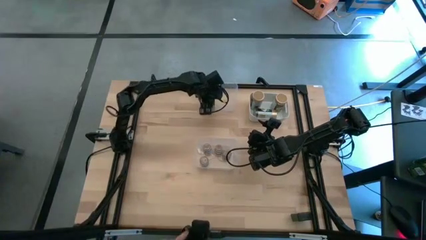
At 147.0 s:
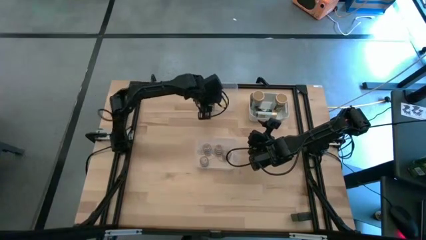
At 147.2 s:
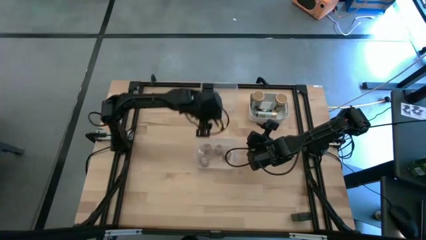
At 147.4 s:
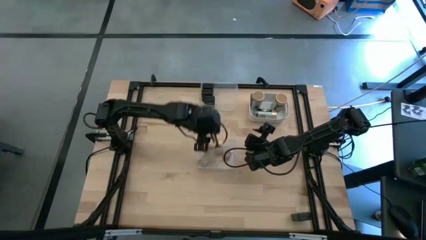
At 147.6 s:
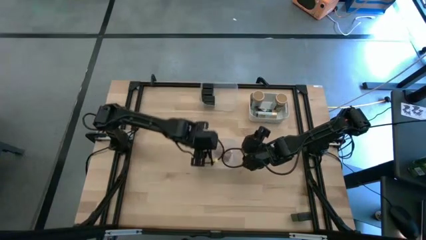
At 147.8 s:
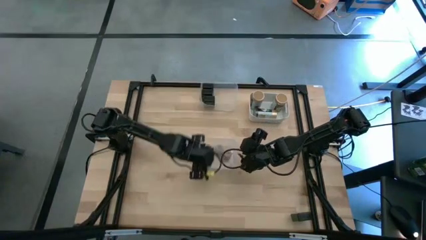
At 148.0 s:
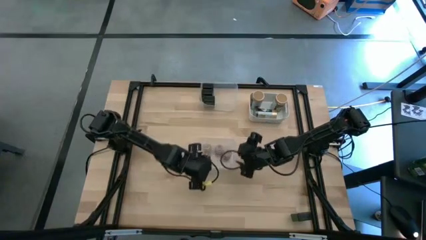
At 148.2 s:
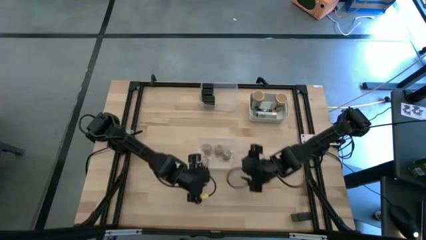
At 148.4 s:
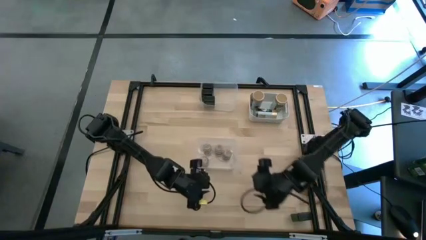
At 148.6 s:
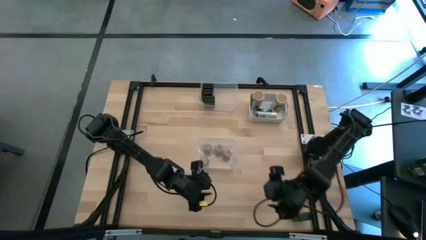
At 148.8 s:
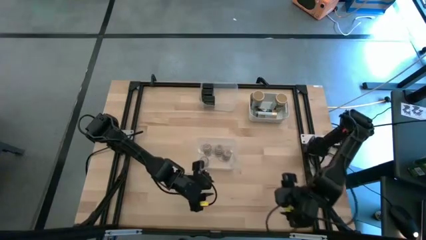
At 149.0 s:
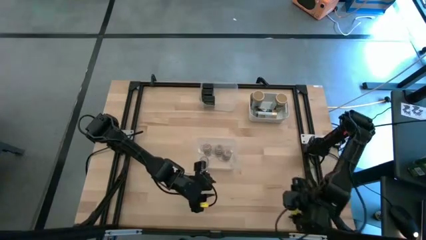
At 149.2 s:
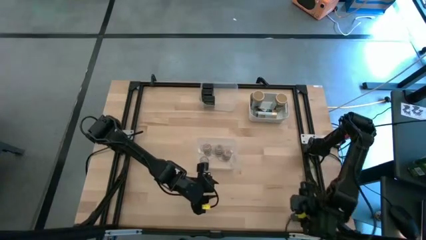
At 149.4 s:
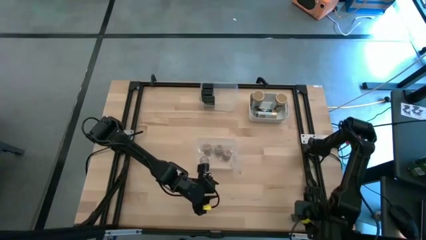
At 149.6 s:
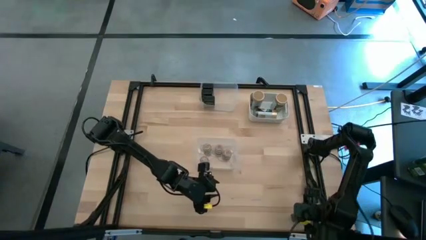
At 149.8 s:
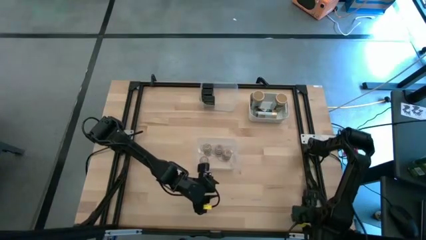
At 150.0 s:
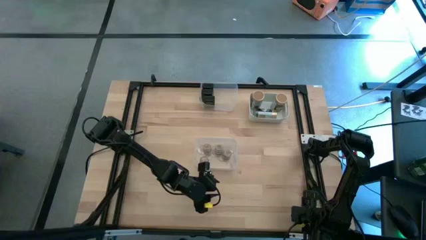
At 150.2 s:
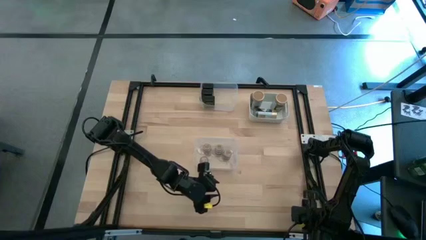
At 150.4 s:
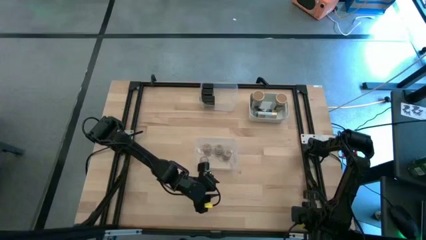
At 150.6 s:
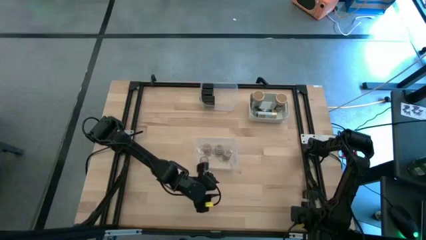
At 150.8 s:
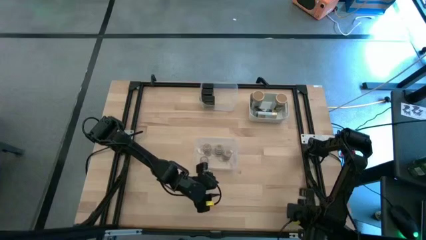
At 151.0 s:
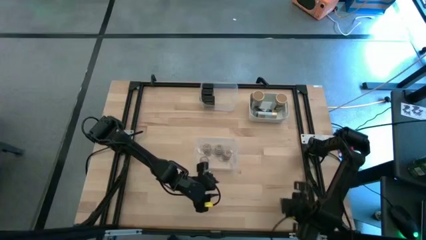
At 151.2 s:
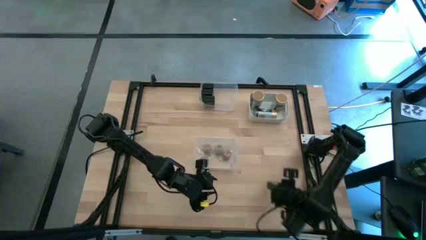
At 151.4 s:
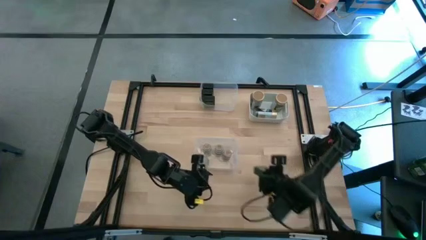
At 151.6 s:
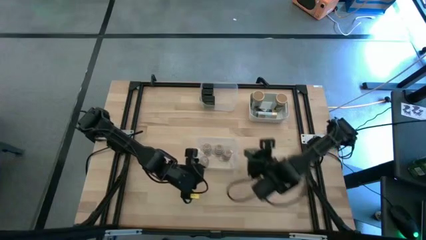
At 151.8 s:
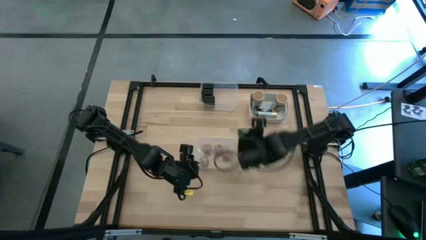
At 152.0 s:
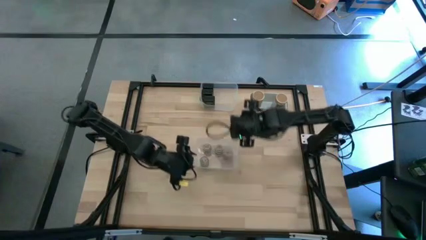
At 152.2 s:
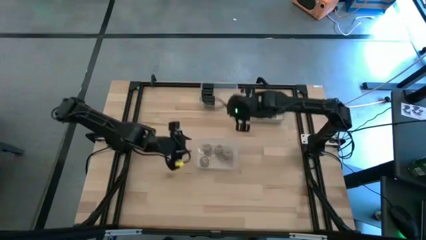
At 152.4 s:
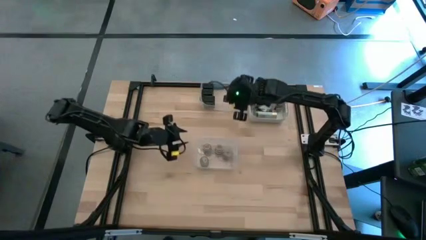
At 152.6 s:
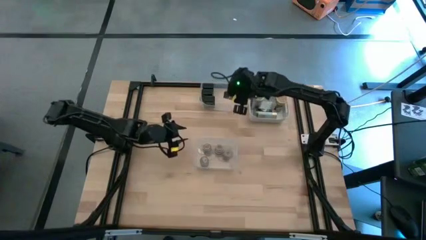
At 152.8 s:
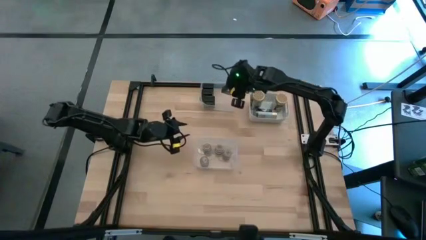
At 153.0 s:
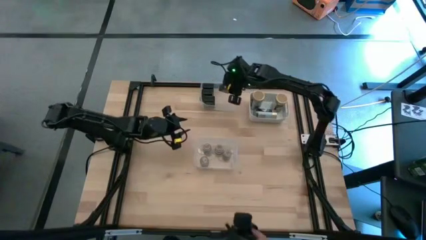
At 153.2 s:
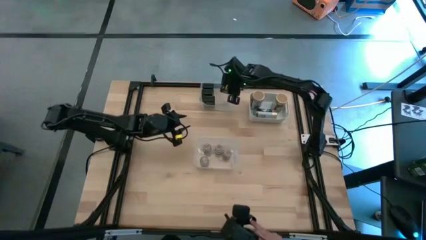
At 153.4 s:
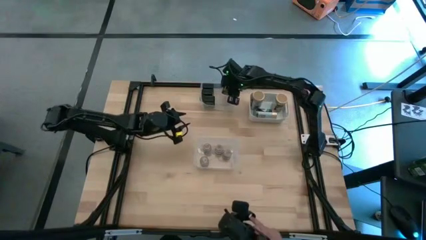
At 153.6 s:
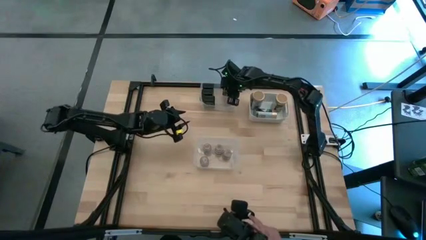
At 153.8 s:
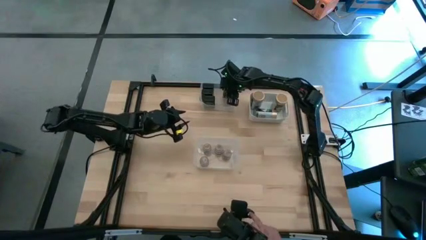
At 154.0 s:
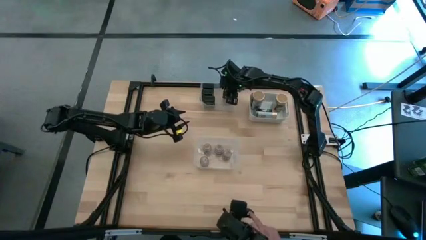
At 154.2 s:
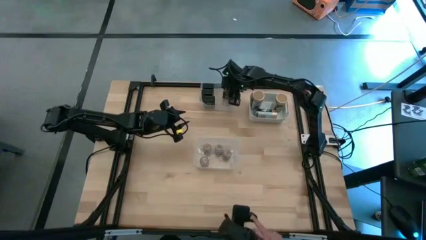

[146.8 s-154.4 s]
Task: Sort spices by type
Put the black seasoning bottle into the top transparent bin

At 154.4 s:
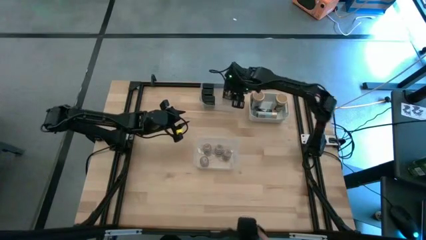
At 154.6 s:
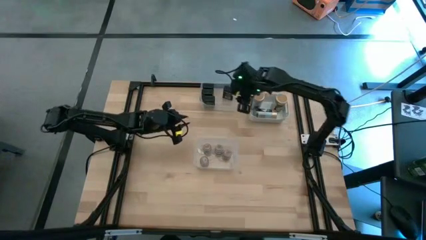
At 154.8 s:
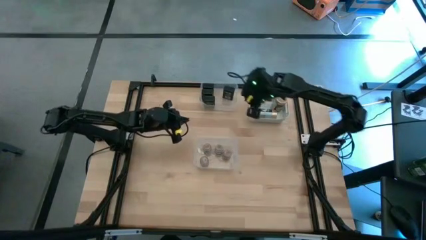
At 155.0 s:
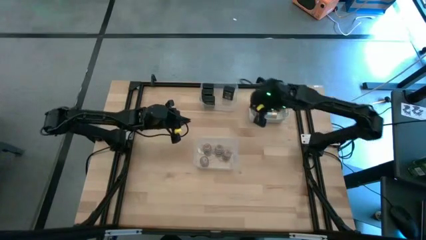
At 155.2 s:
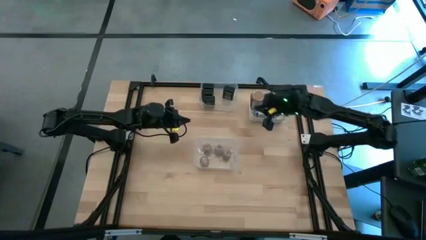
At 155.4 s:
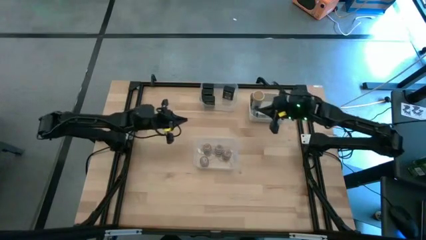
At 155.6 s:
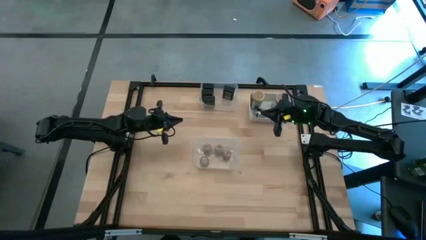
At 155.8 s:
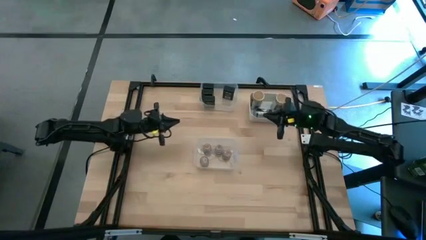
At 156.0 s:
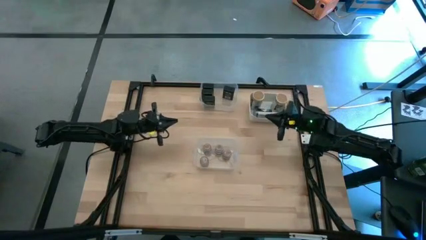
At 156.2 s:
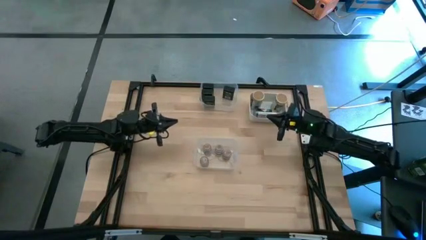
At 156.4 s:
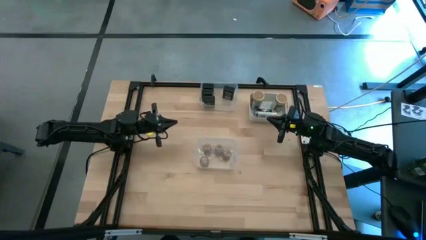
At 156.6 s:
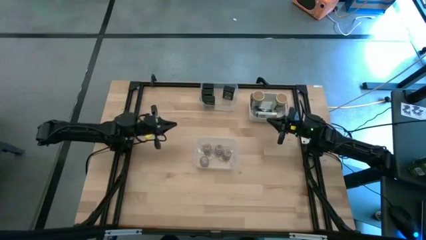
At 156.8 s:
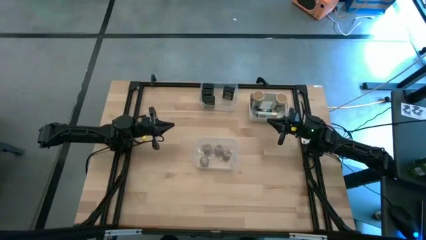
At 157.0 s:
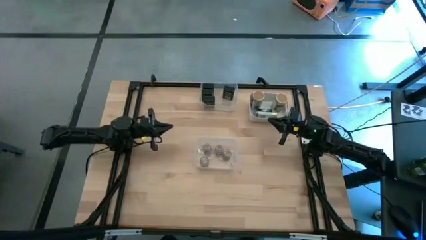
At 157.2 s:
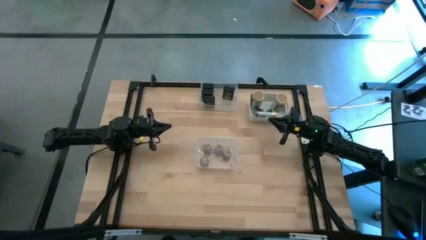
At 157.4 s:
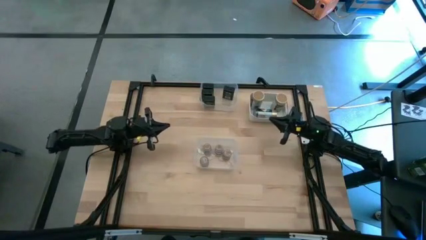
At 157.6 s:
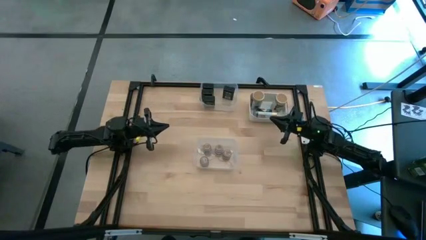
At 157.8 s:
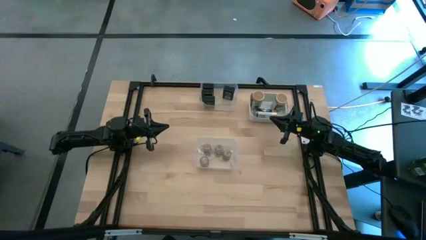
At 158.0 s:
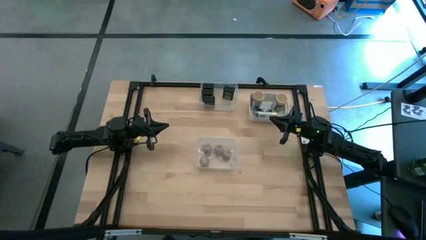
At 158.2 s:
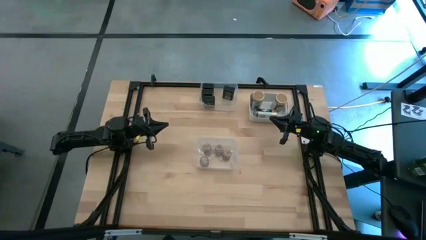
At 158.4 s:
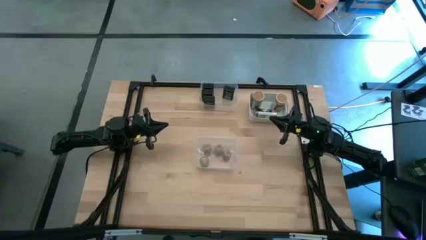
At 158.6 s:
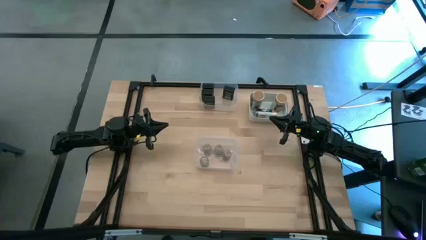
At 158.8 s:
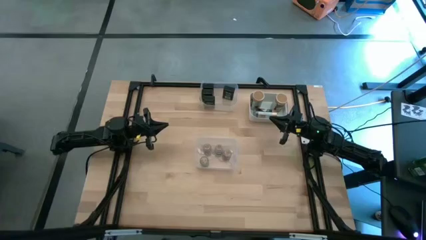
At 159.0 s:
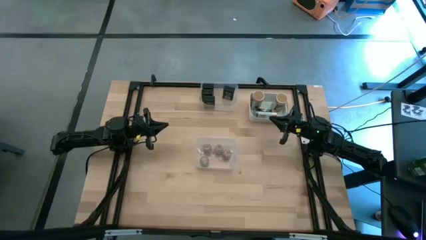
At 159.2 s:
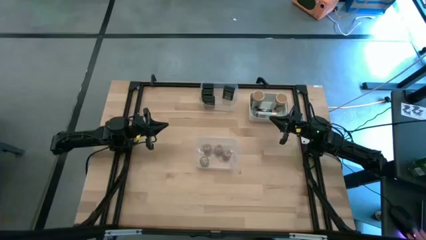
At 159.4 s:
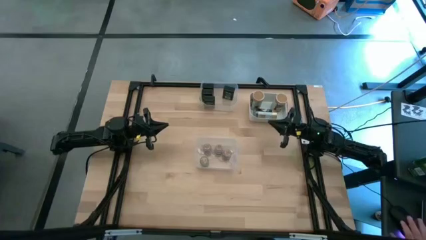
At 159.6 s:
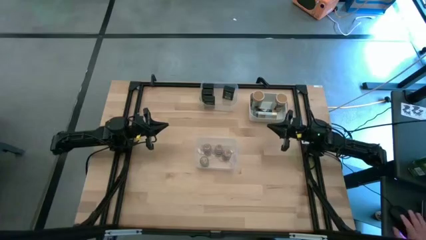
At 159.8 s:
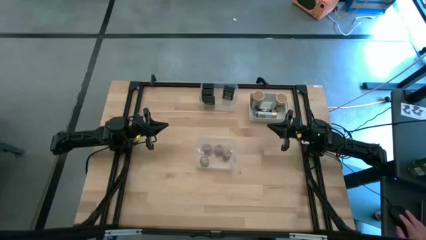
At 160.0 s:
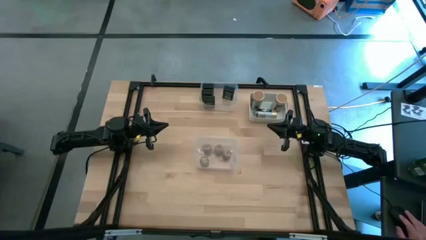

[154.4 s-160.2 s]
Return to Home Position

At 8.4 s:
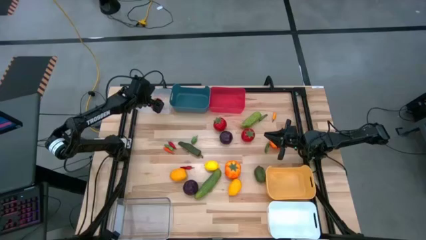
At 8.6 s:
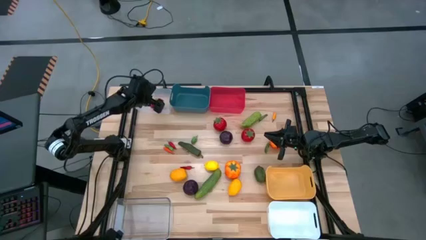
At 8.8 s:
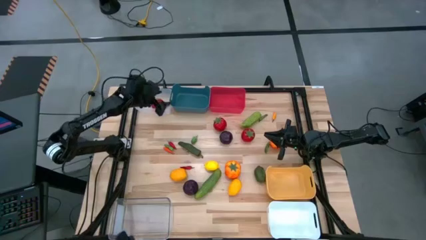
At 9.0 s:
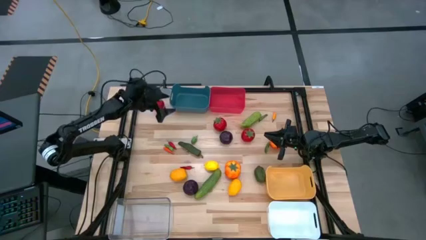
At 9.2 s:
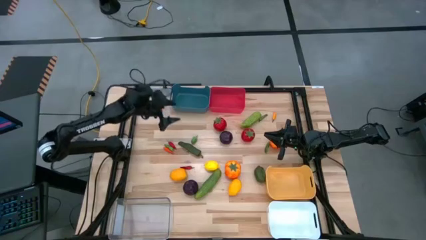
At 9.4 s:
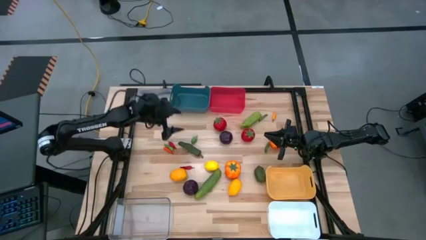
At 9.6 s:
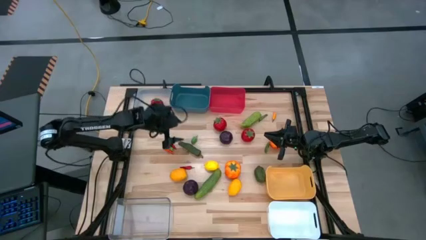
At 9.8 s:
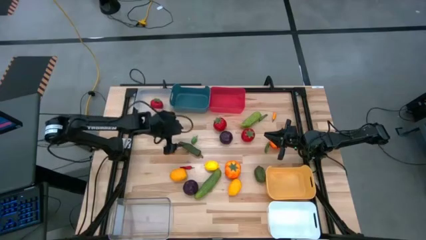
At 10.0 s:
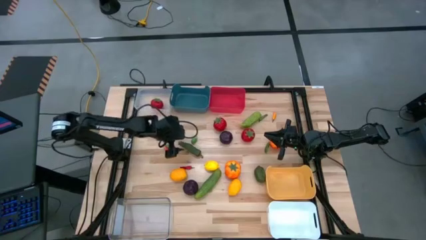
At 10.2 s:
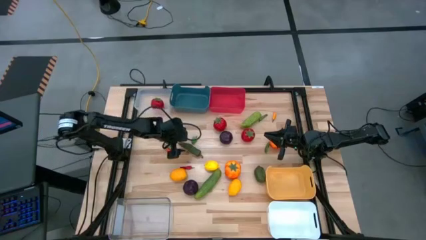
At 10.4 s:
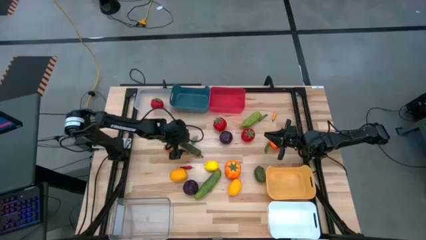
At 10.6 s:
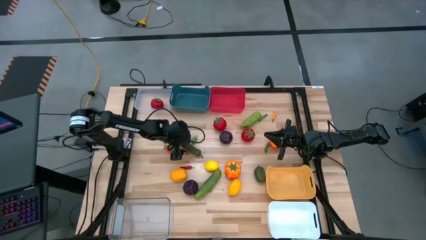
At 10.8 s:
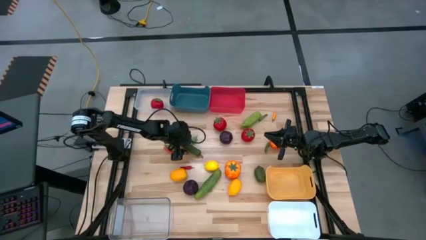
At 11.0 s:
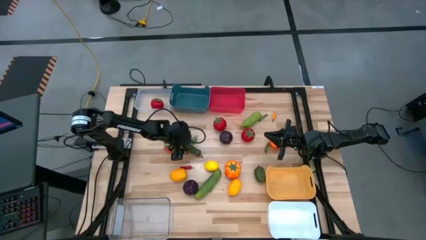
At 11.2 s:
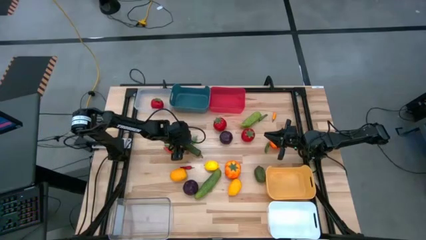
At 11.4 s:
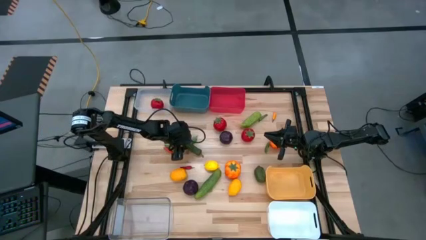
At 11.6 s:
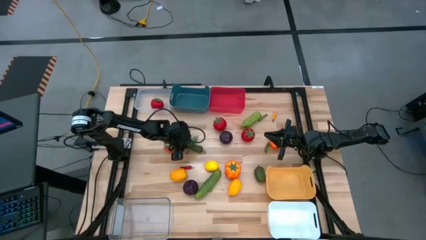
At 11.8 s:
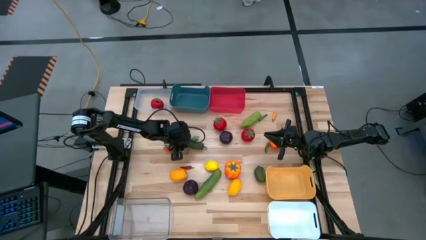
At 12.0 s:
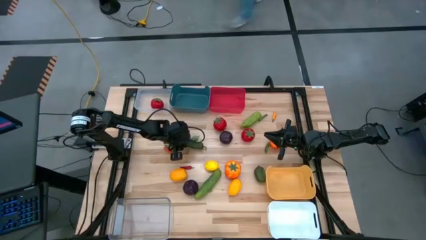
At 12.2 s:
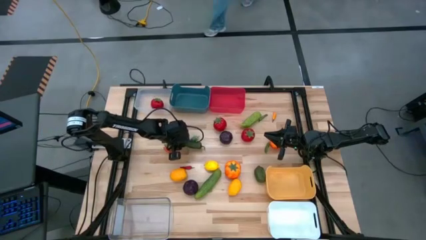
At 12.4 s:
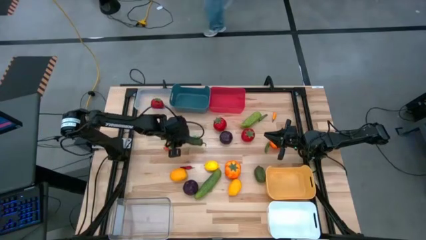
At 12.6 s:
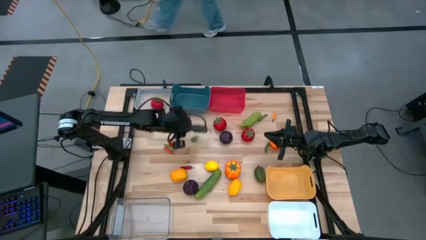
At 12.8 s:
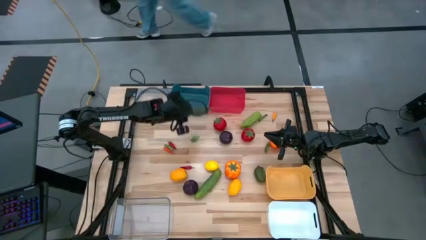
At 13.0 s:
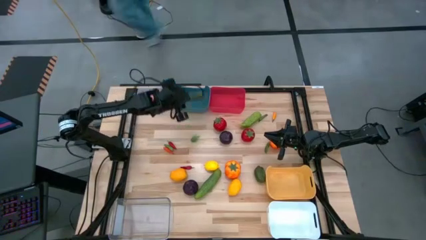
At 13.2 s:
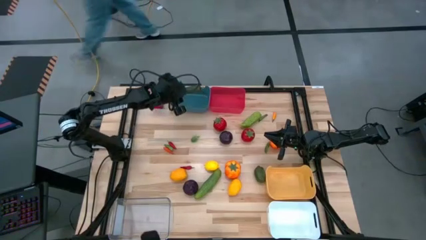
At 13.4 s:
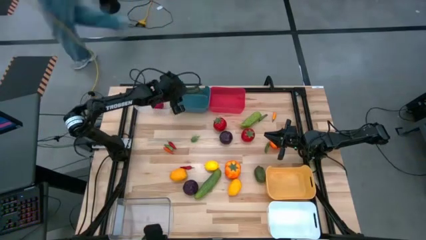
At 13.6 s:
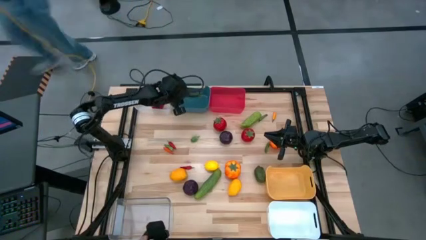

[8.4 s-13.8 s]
Task: Sort produce into baskets
Put the green chili pepper into the blue bin
